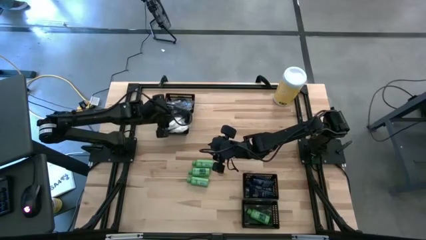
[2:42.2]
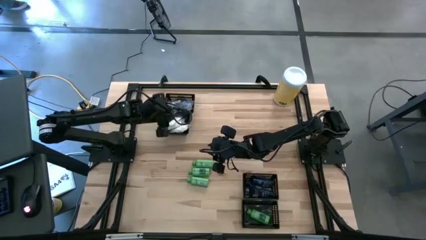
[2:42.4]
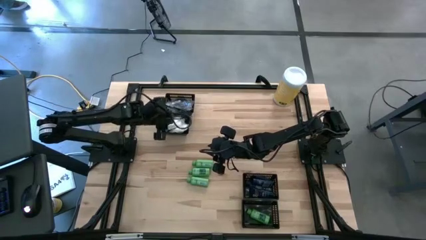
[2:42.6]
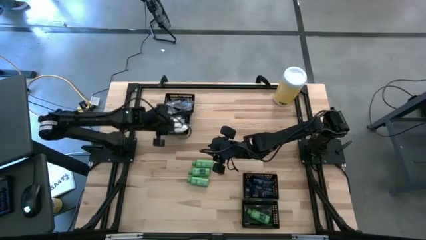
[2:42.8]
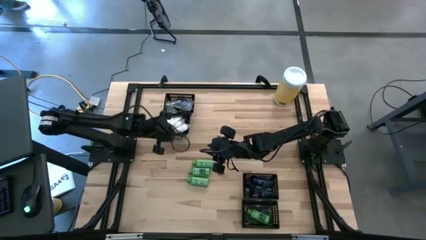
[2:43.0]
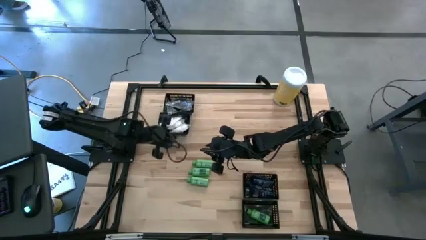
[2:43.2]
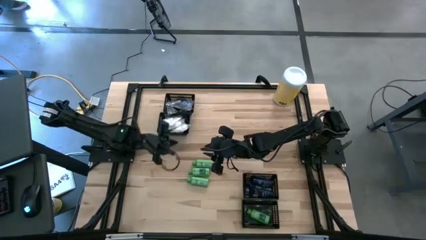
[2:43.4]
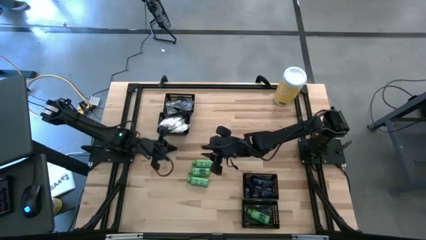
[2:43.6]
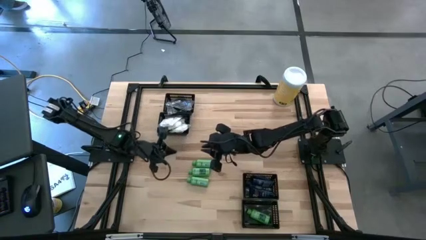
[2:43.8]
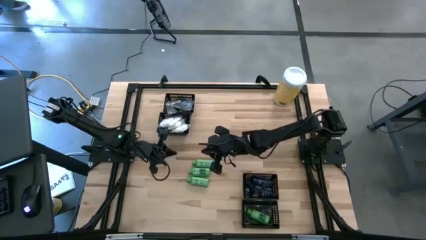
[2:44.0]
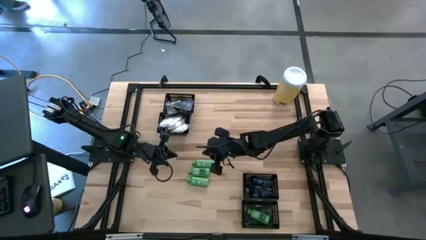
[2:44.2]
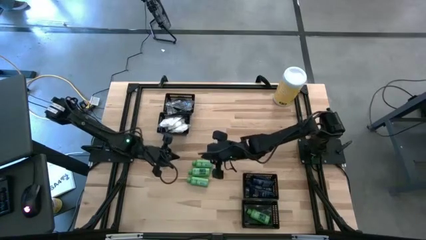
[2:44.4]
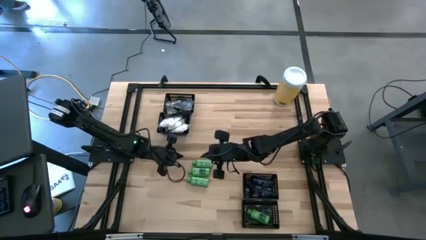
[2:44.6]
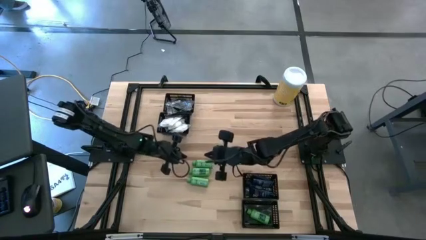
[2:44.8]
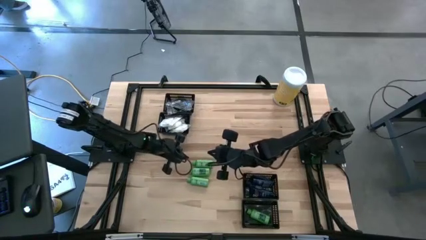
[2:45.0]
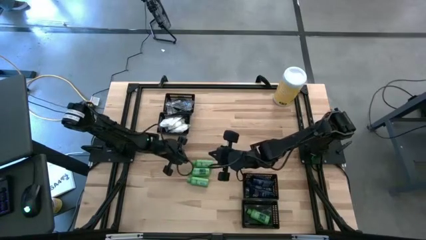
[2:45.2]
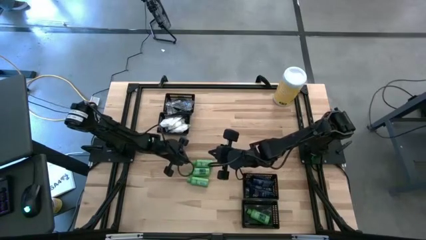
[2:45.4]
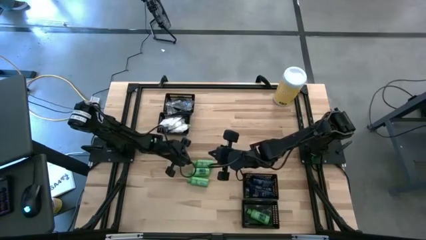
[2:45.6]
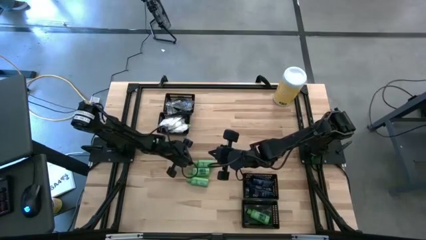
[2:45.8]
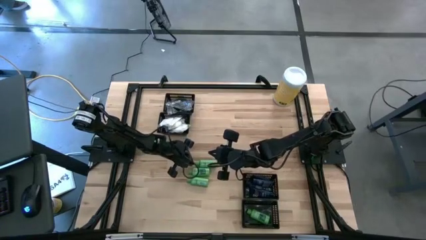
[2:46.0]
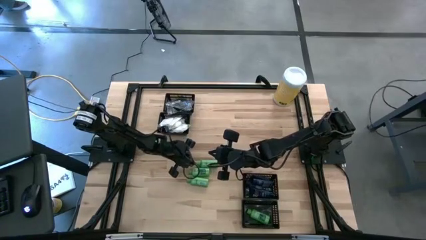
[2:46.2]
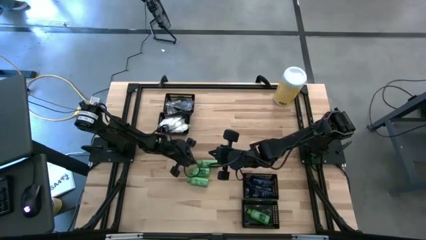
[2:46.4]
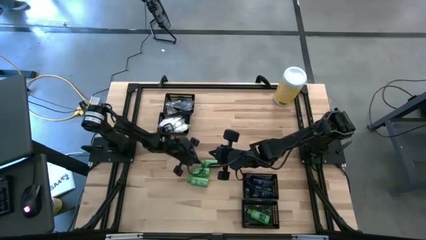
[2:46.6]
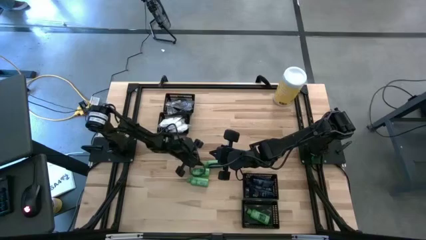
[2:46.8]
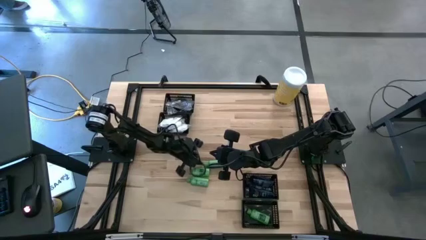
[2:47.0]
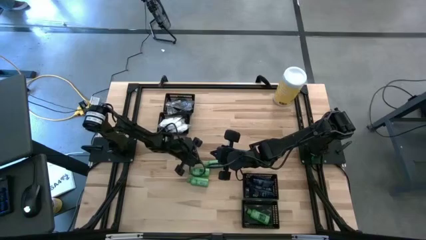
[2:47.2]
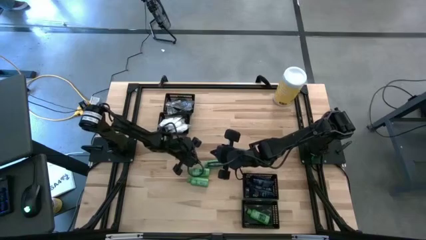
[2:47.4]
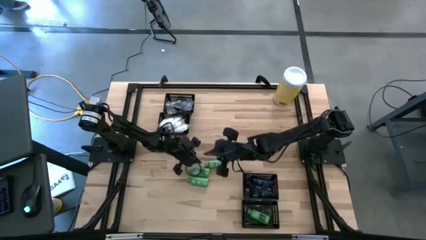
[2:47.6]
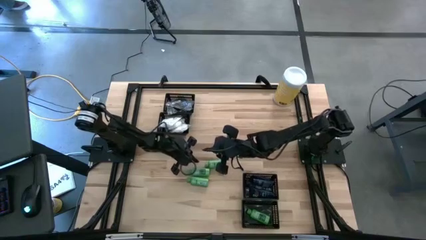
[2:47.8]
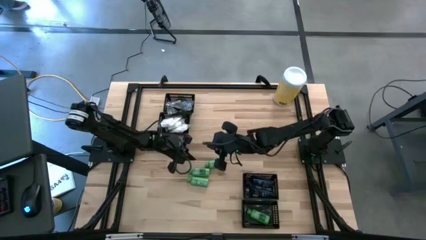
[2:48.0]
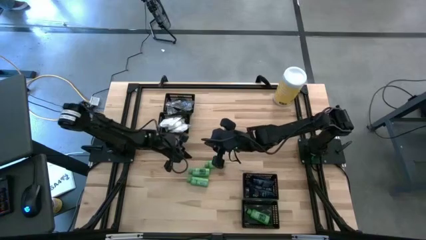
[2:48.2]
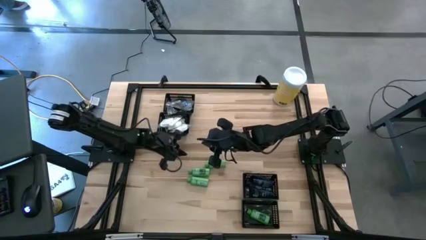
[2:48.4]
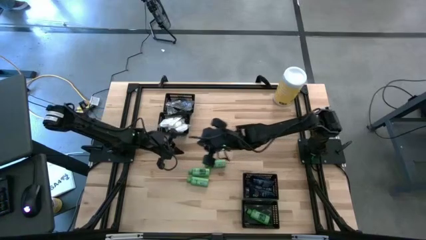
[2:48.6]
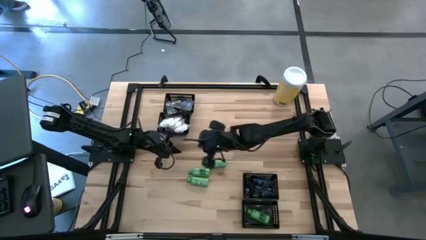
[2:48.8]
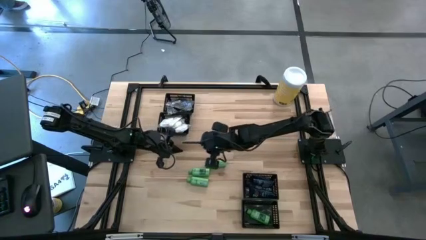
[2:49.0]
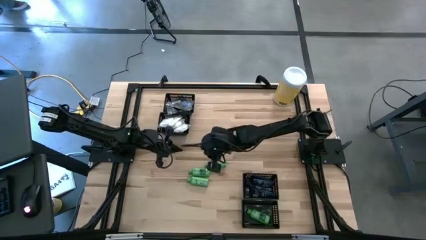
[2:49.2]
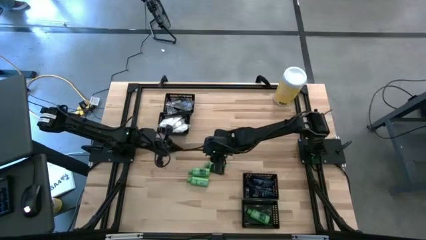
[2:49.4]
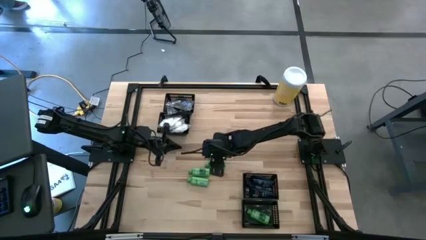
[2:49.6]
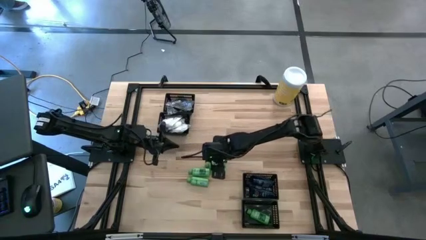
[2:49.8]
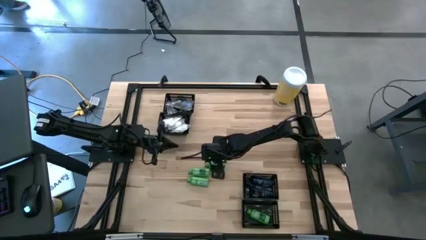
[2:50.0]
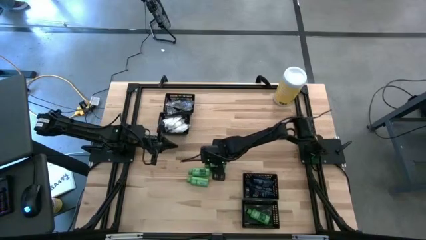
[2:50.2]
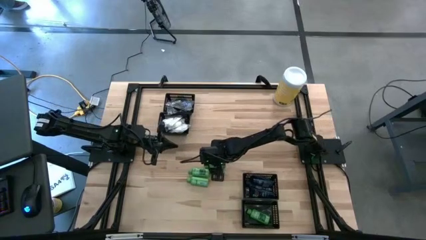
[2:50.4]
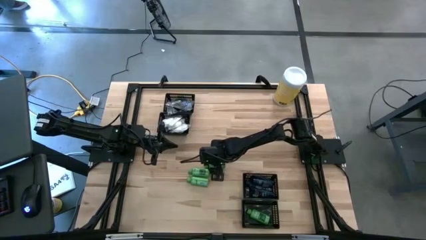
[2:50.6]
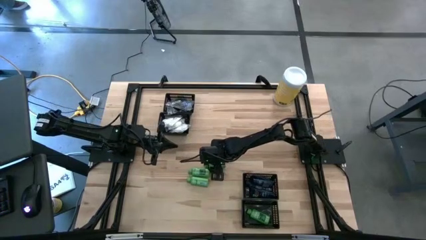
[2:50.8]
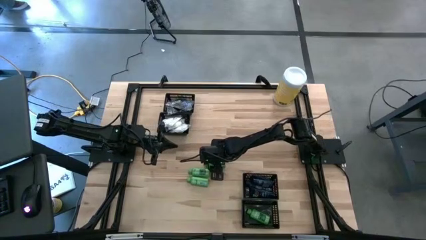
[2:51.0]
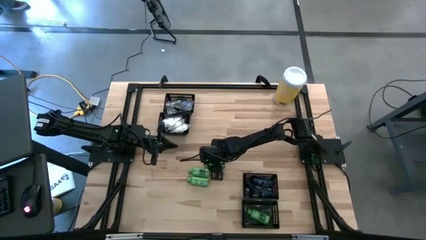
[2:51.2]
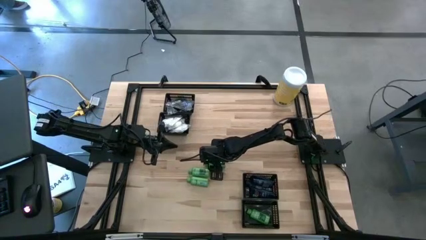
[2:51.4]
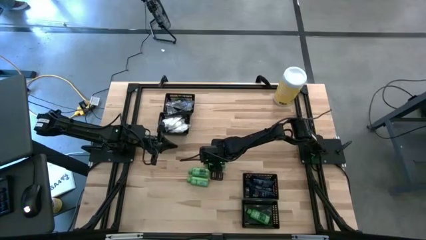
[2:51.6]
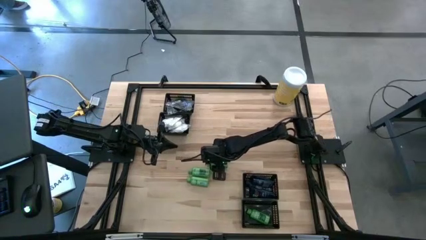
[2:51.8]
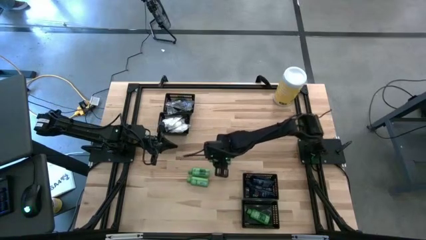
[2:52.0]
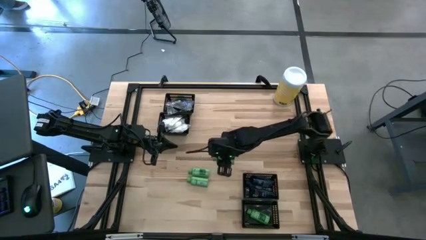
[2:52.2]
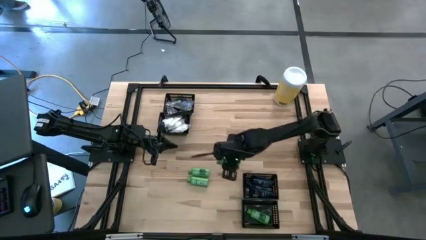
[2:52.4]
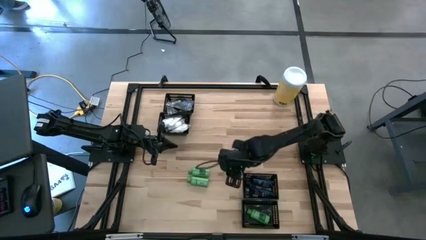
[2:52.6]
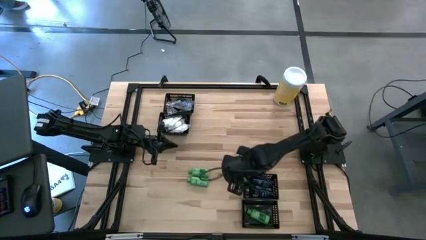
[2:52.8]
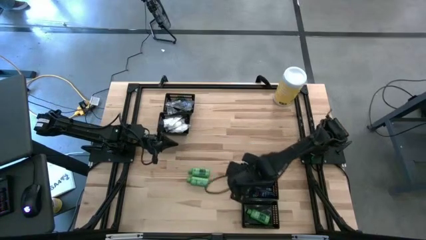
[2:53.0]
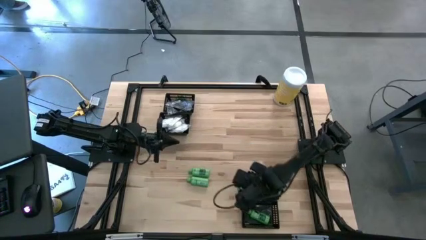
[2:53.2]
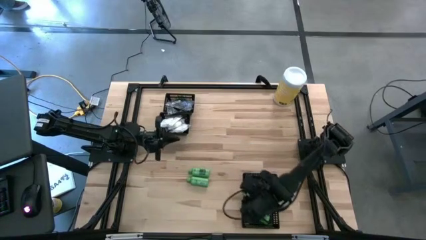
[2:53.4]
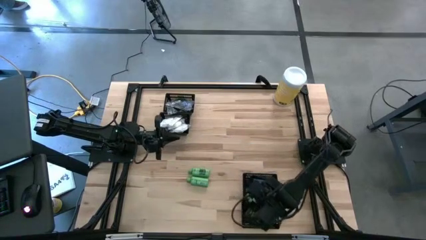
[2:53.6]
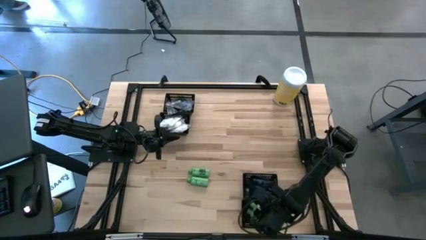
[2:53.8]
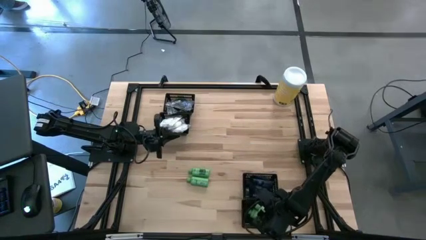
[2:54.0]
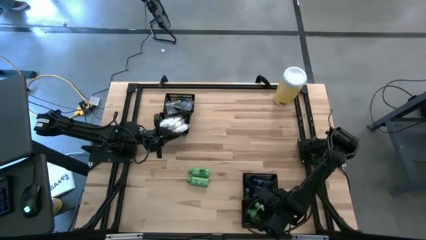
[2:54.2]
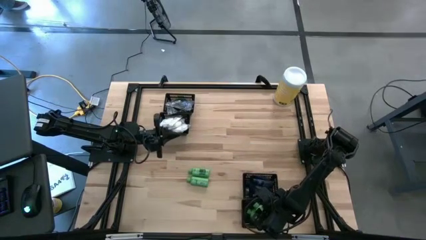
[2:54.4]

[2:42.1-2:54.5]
Task: Pick & Place Travel size toiletries
Put the green shampoo into the bottom black basket
